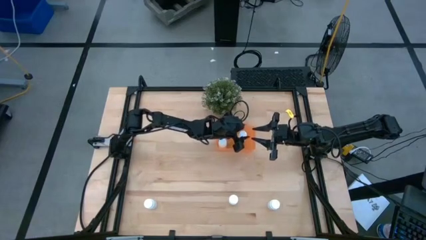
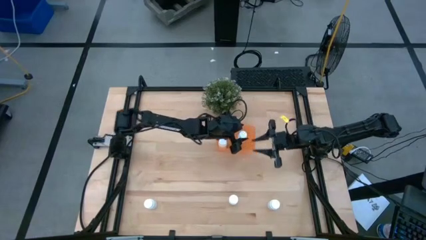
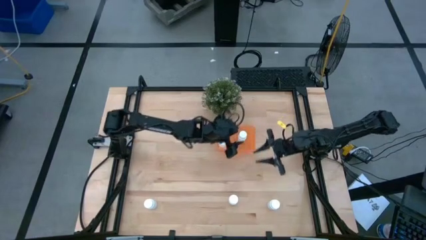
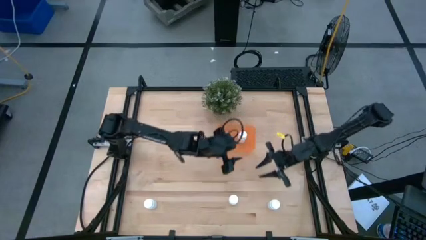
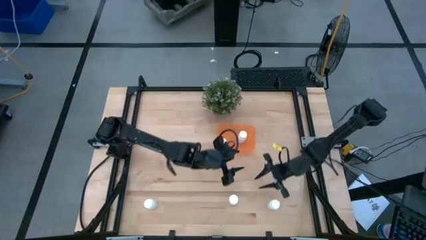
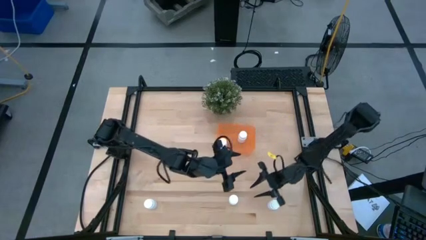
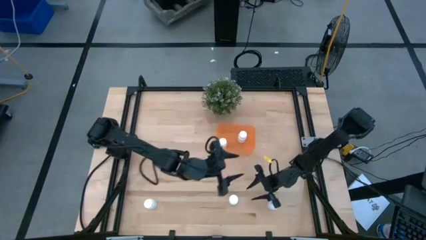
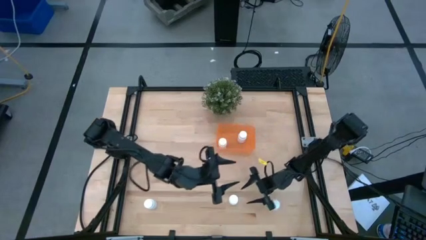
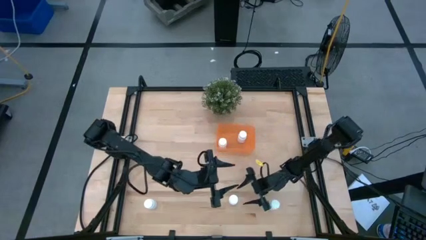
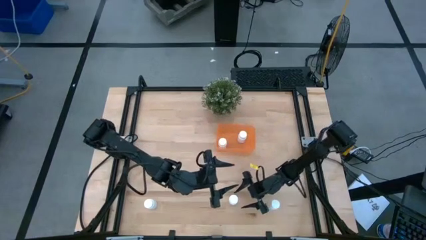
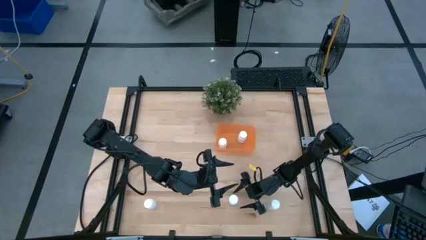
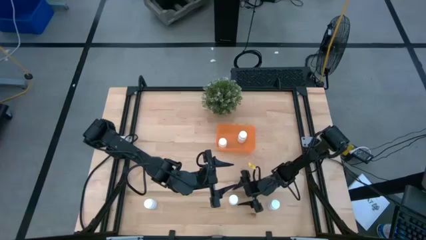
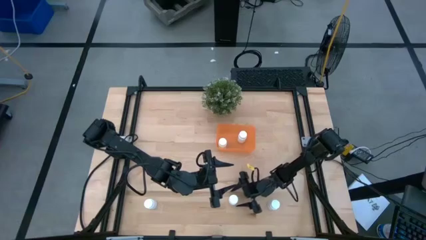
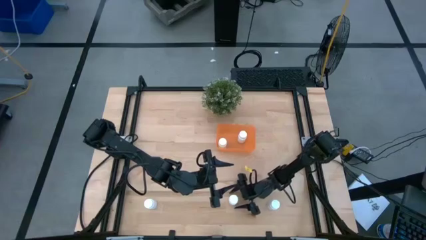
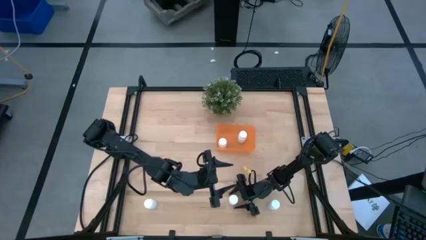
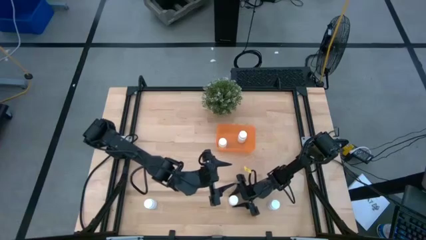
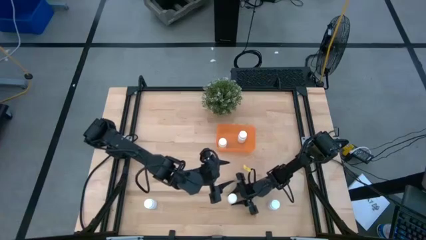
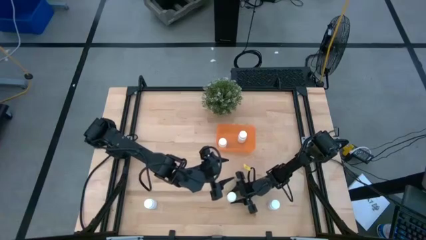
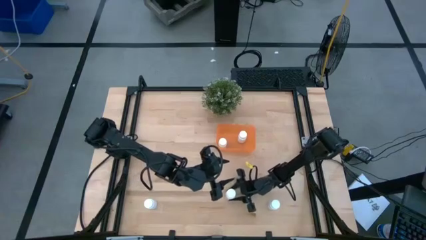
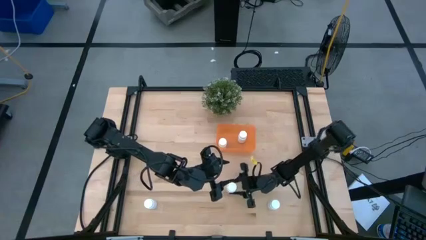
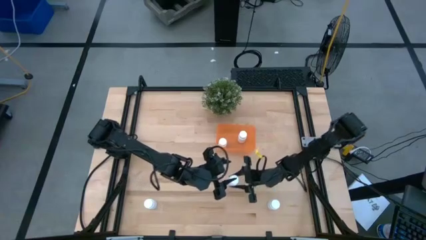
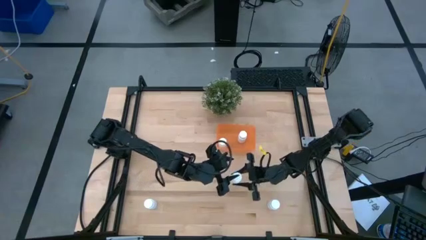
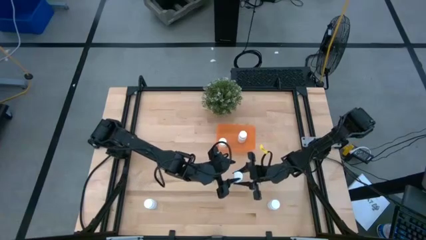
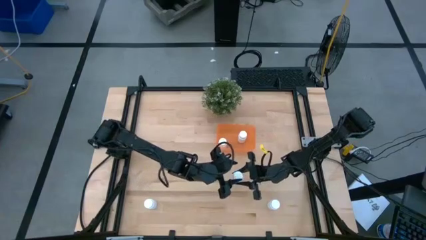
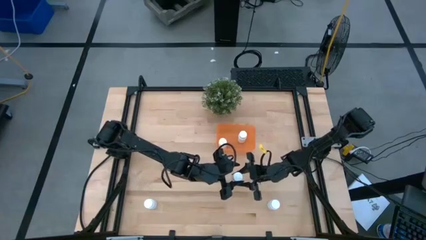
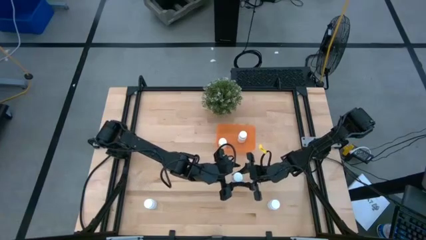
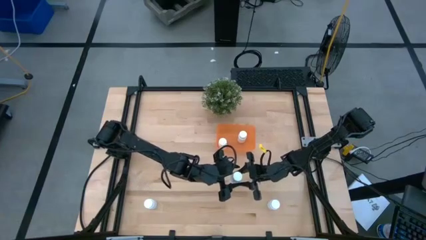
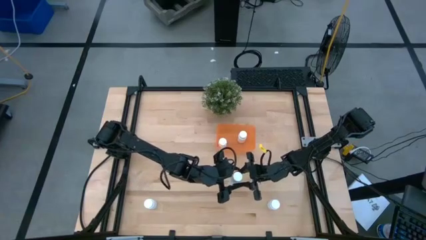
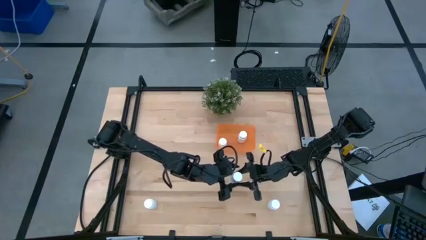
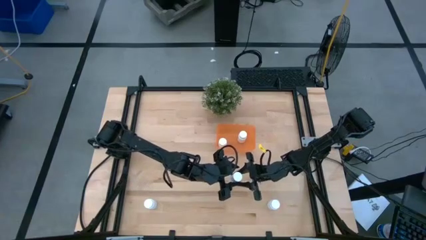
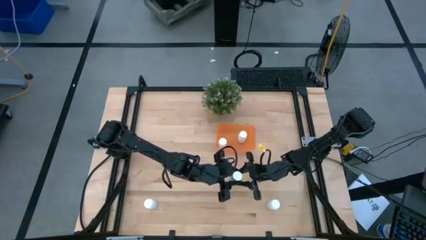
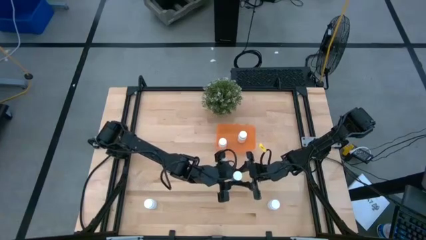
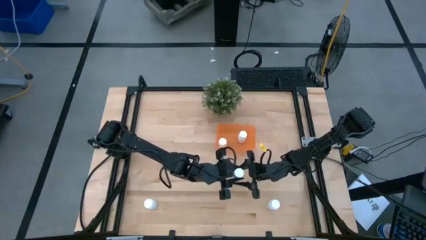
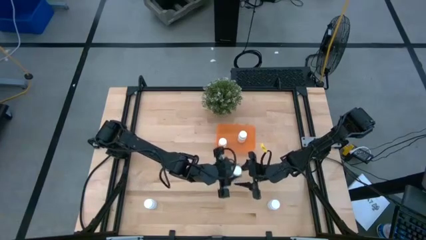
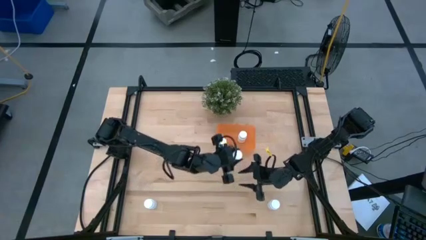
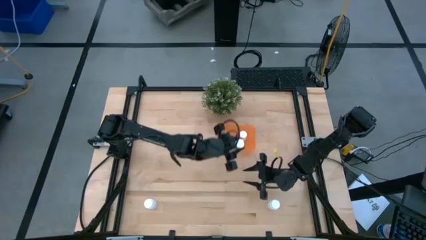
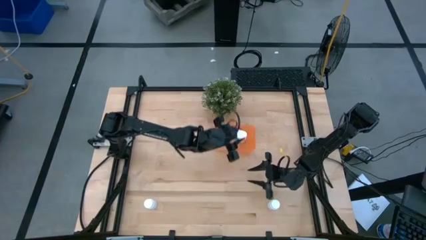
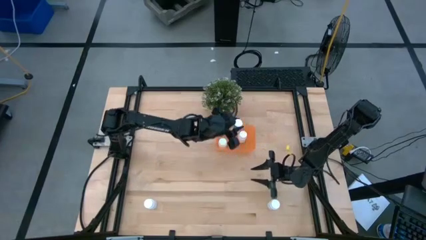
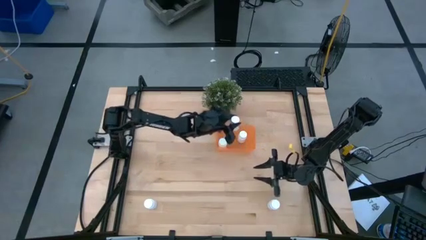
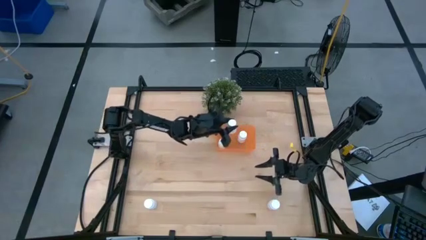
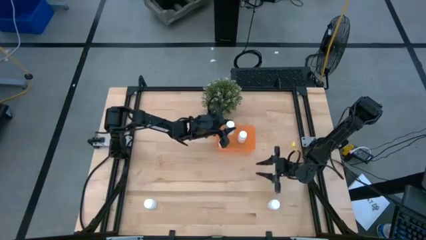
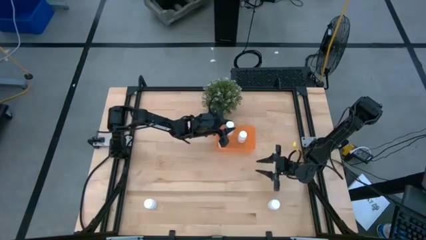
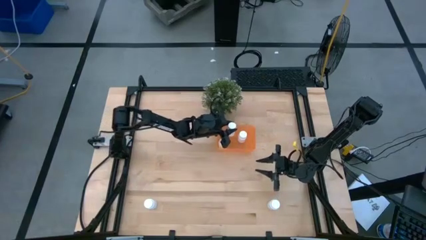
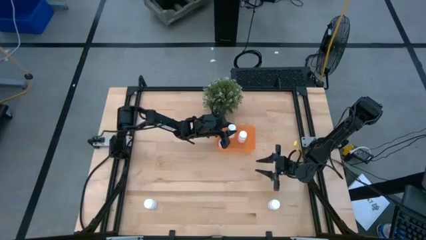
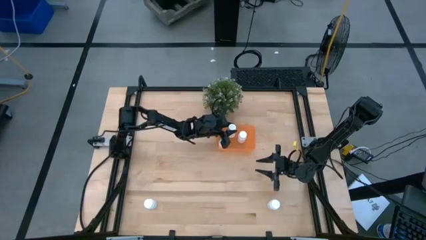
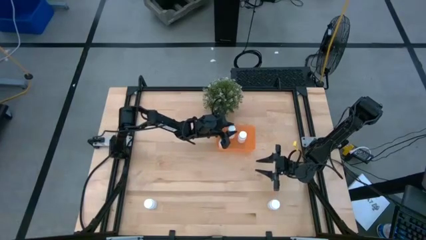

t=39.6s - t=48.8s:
Task: Pick and place pill bottles into a basket
Put the white pill bottle into the orange bin

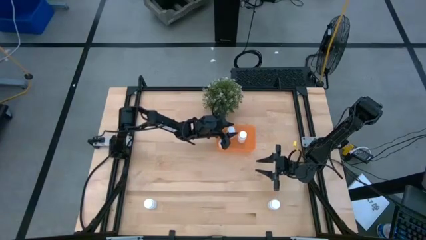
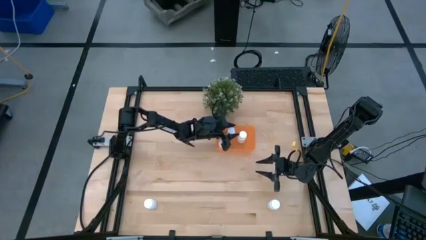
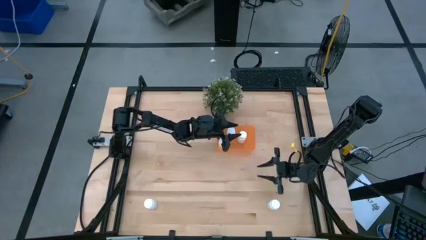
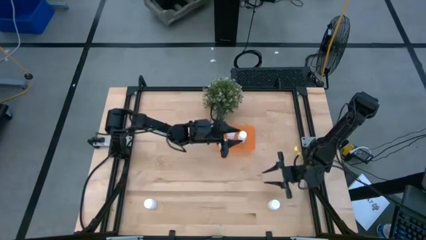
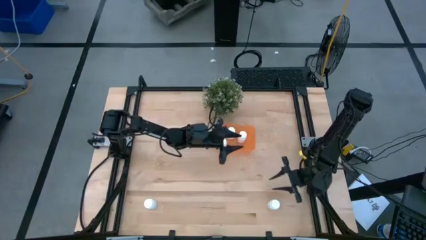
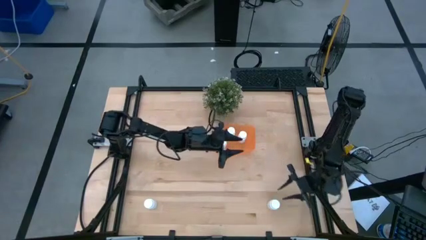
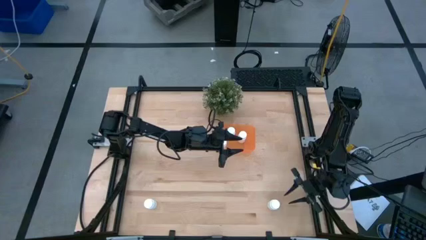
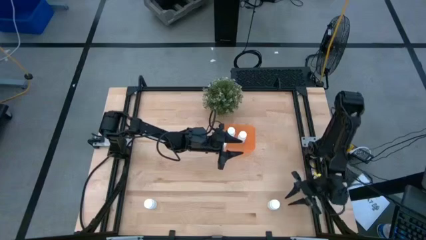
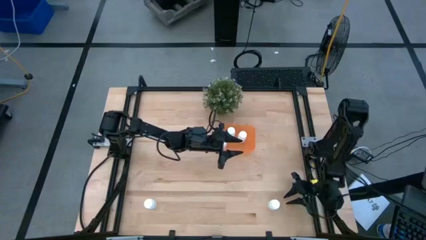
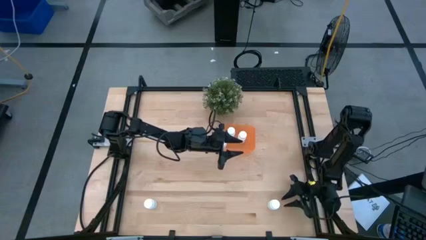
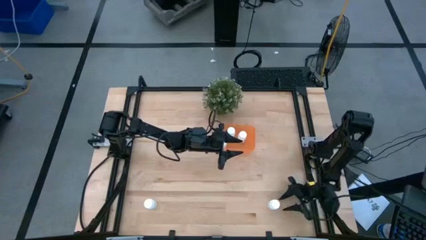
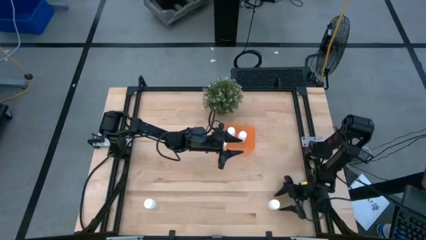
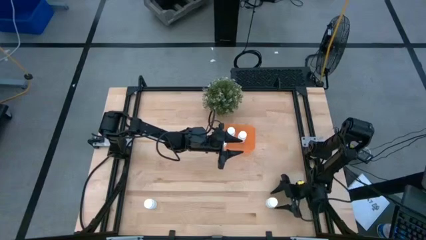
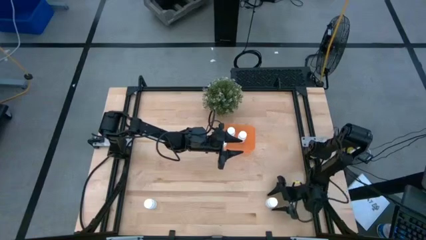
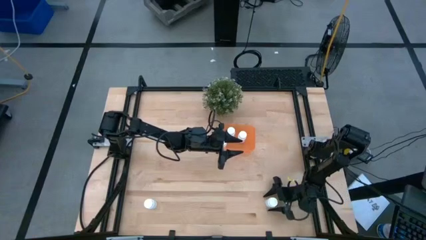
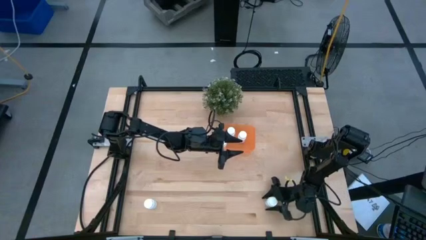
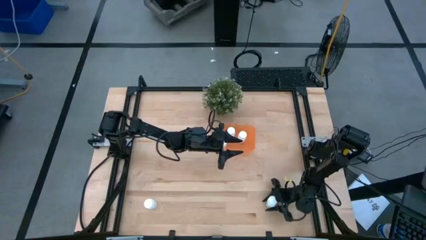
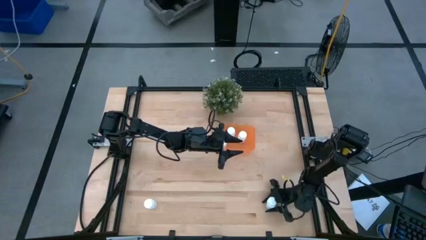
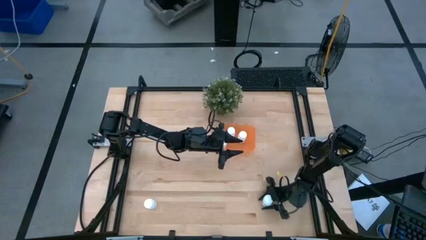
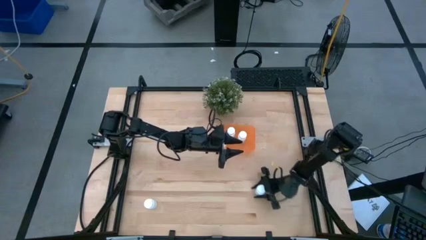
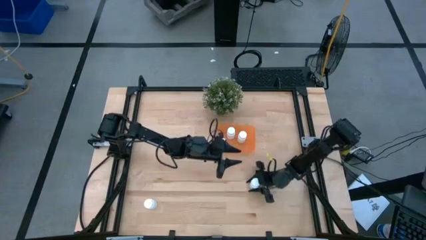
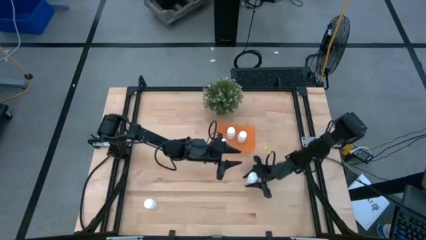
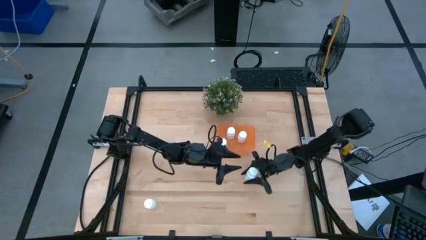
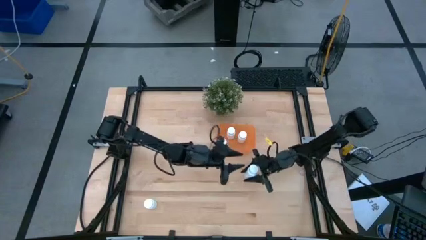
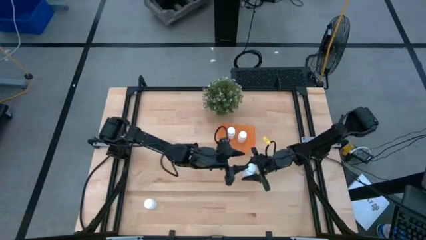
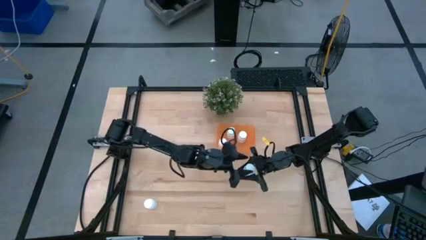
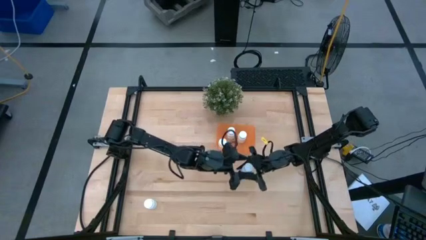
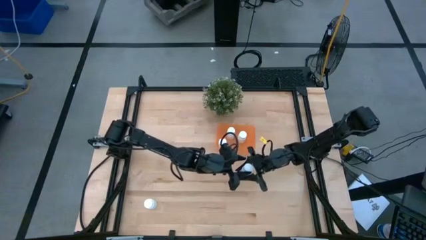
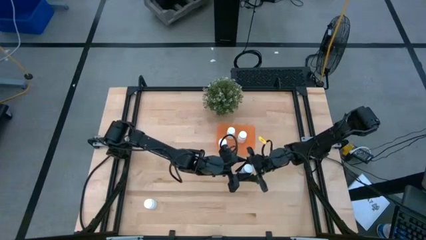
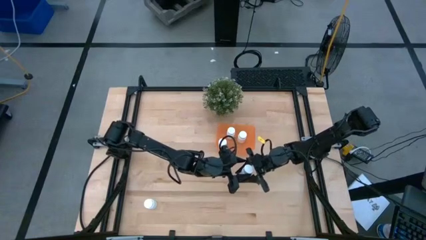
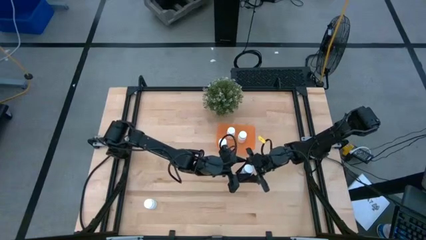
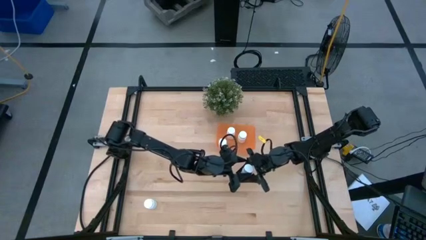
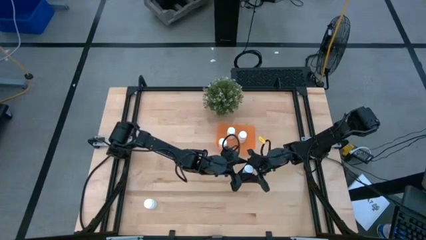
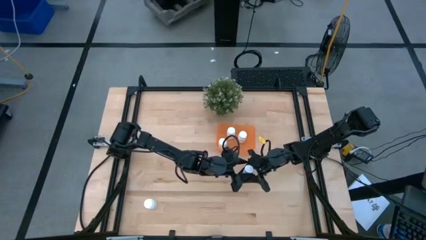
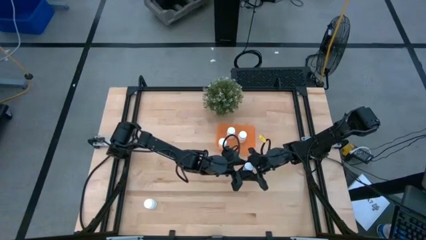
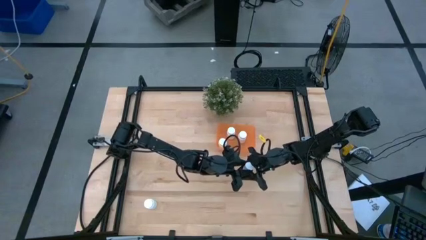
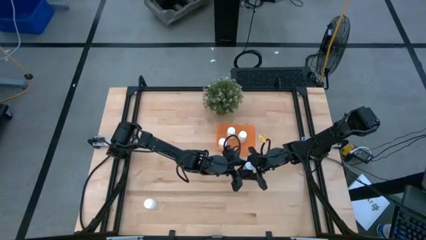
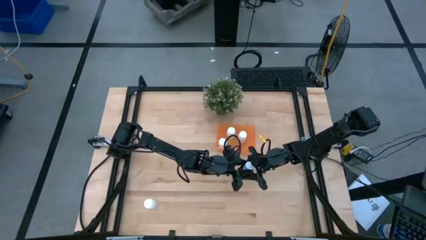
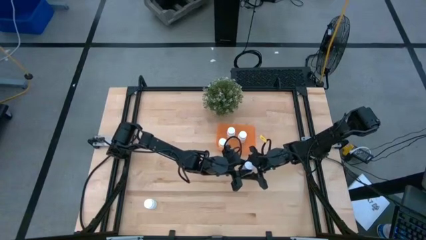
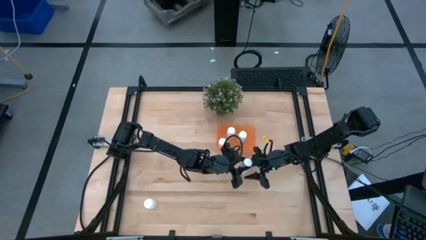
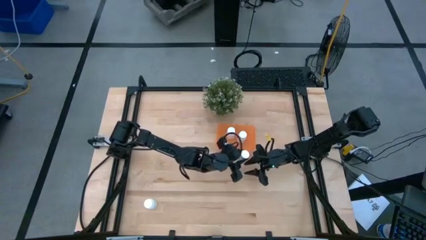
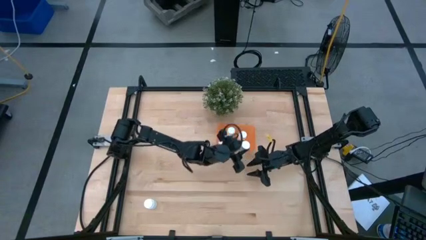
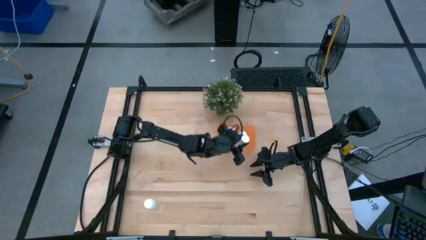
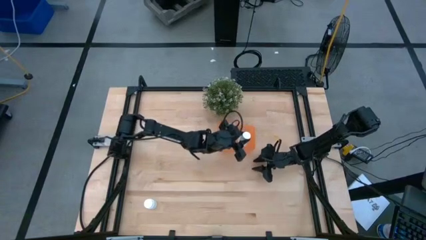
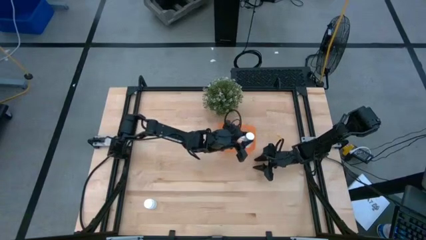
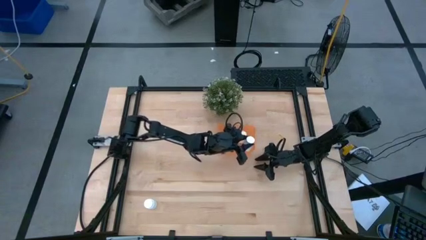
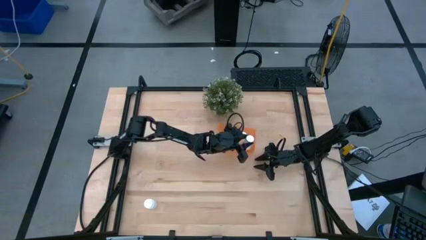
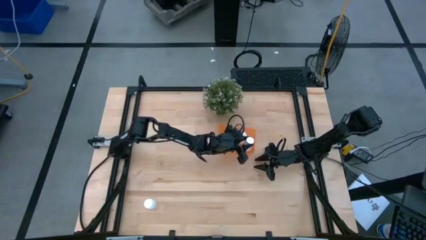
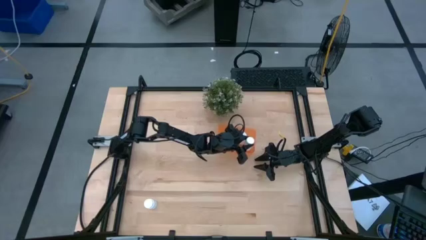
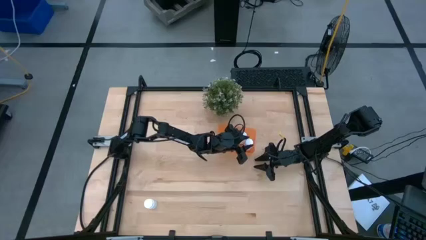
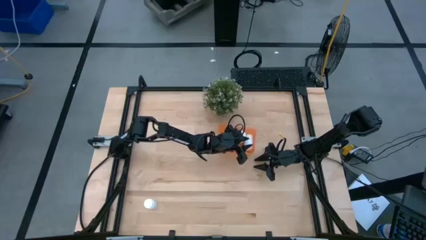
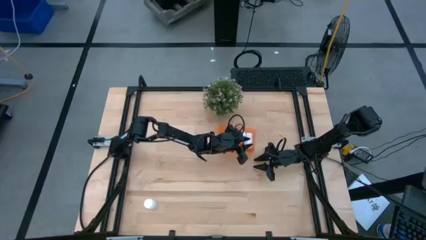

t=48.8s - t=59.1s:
Put the white pill bottle into the orange bin
